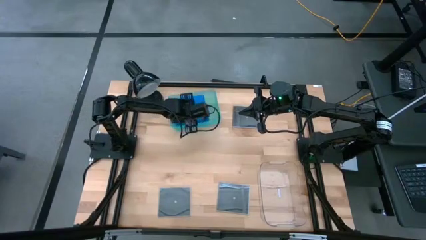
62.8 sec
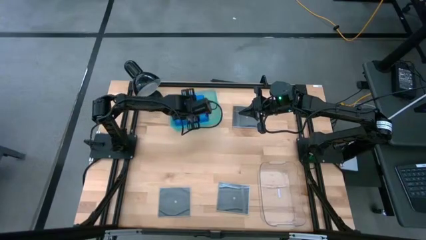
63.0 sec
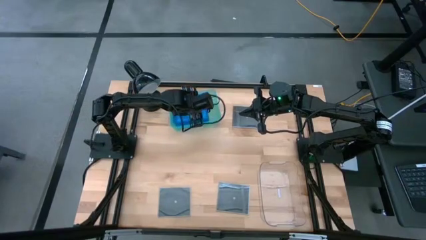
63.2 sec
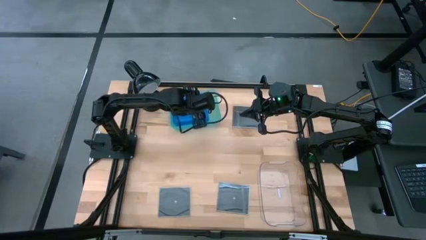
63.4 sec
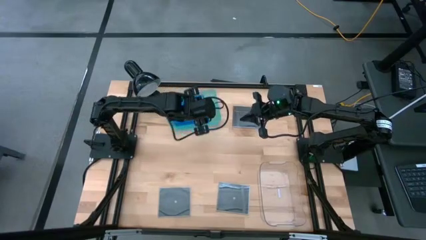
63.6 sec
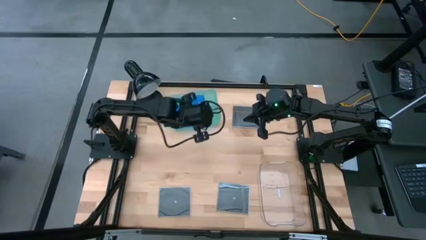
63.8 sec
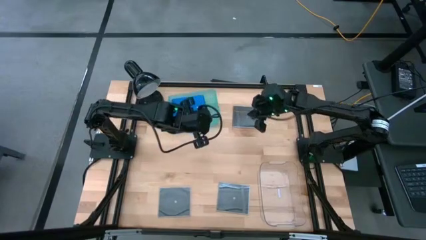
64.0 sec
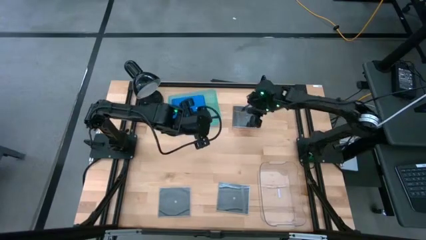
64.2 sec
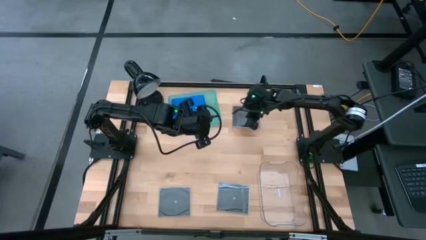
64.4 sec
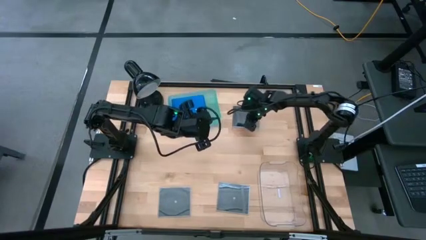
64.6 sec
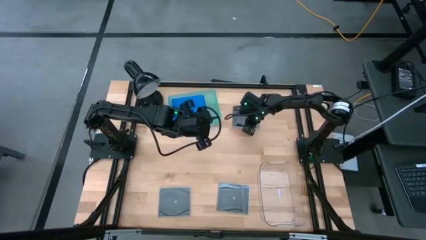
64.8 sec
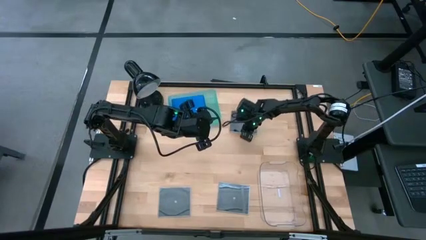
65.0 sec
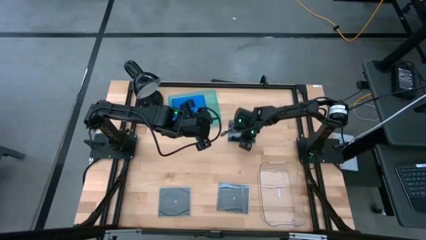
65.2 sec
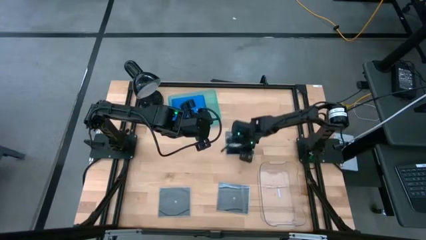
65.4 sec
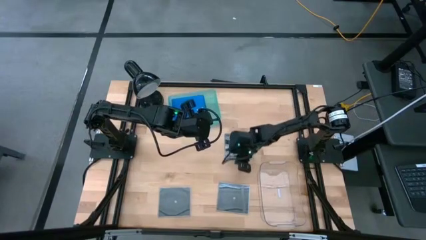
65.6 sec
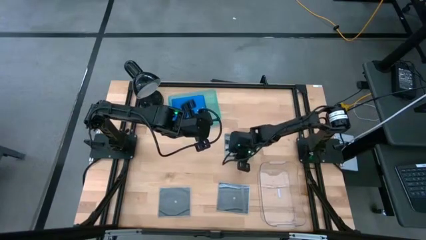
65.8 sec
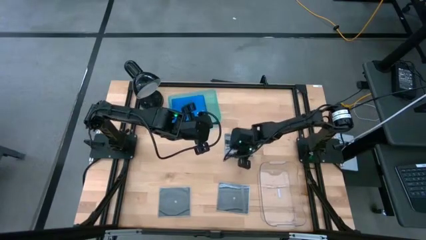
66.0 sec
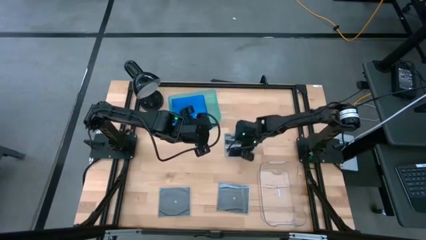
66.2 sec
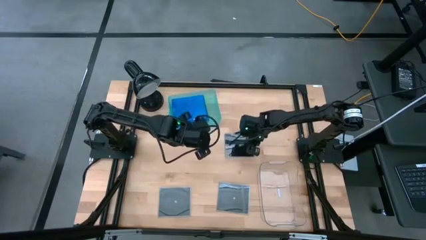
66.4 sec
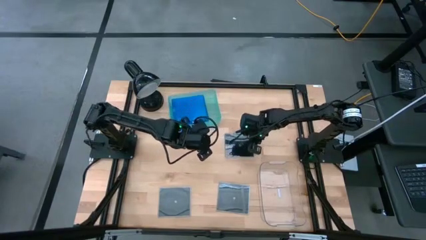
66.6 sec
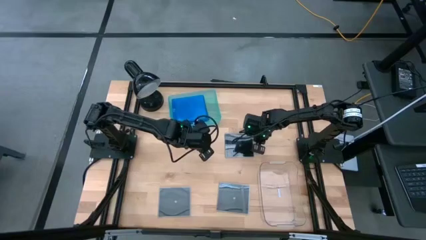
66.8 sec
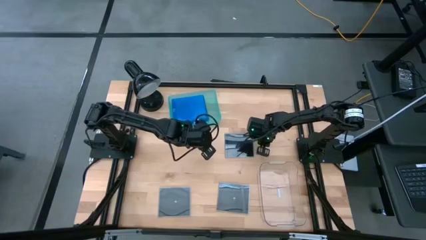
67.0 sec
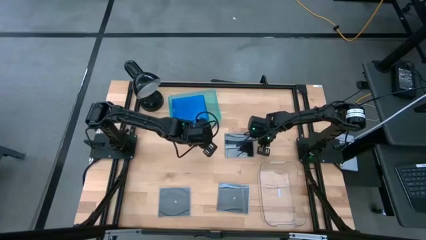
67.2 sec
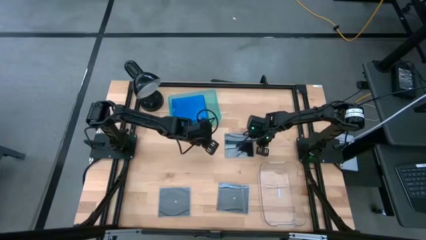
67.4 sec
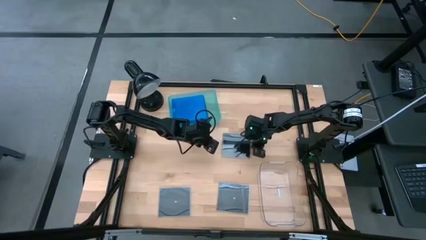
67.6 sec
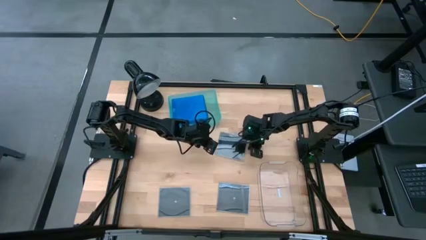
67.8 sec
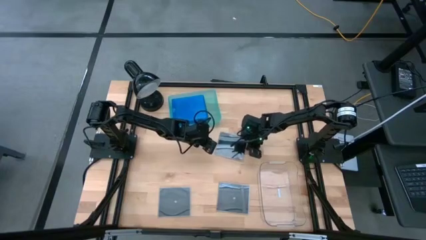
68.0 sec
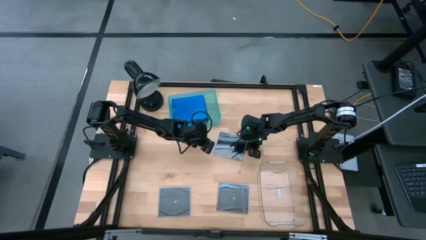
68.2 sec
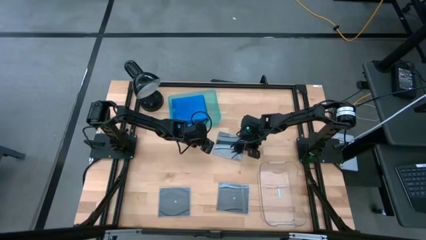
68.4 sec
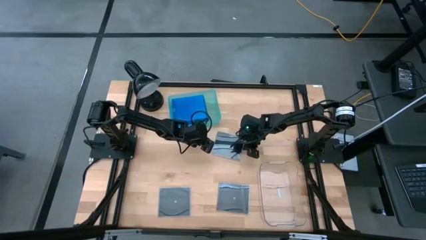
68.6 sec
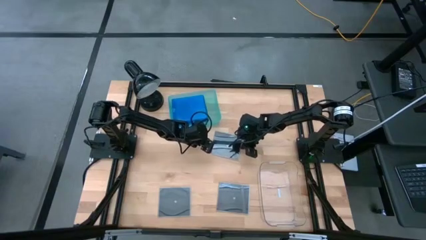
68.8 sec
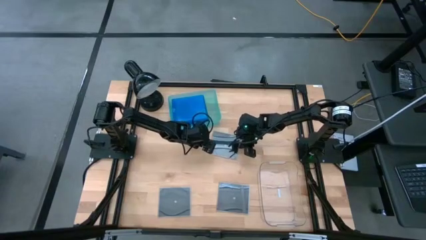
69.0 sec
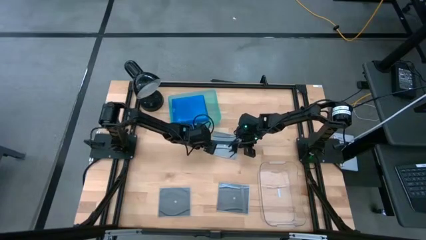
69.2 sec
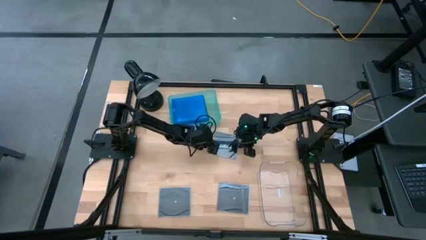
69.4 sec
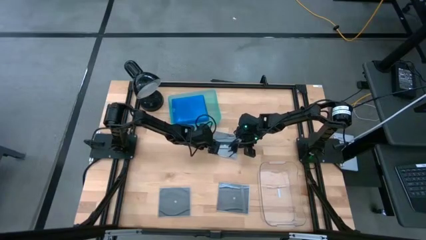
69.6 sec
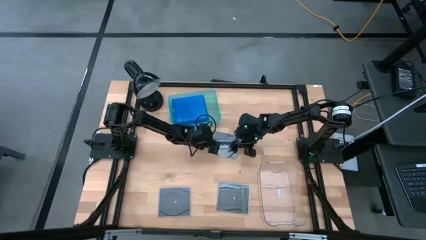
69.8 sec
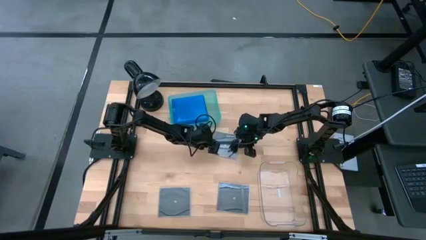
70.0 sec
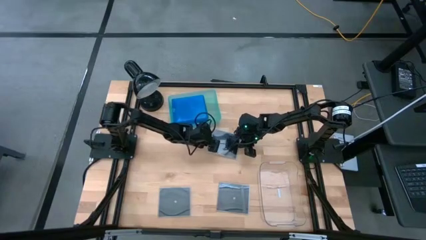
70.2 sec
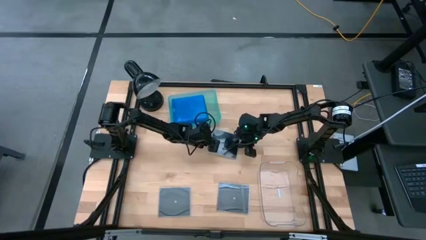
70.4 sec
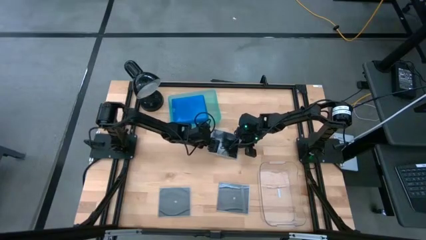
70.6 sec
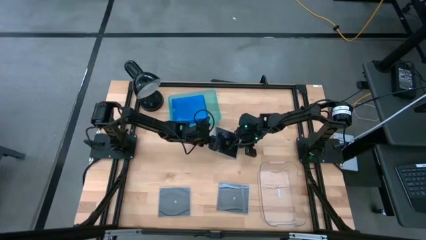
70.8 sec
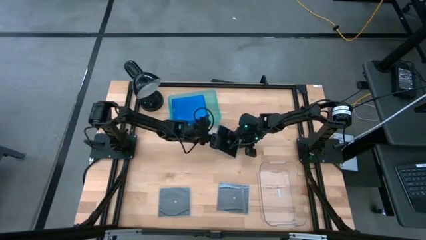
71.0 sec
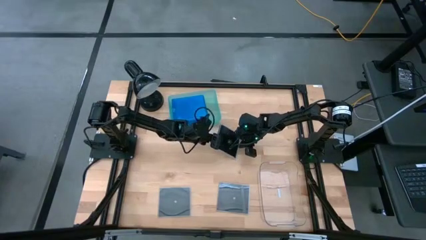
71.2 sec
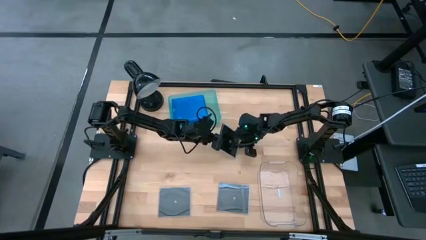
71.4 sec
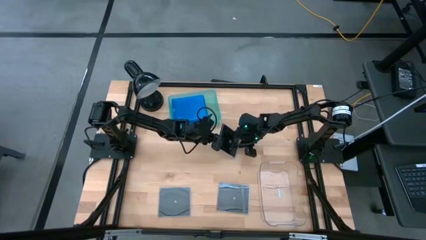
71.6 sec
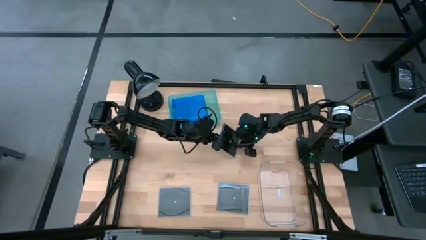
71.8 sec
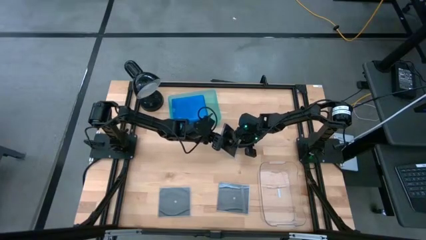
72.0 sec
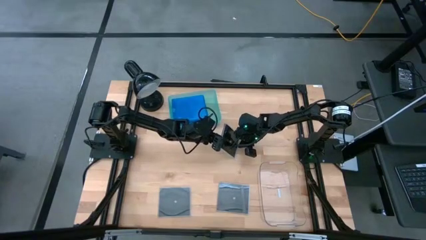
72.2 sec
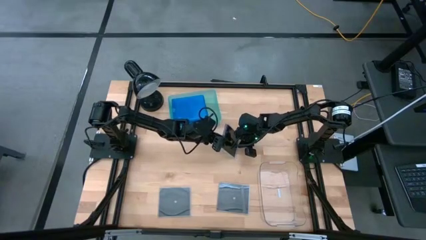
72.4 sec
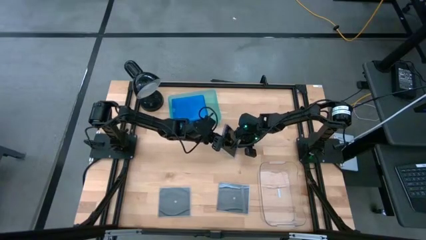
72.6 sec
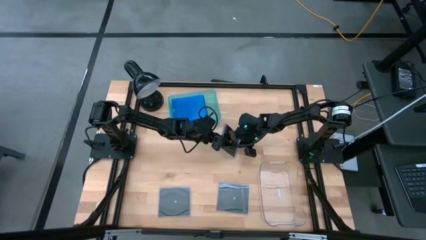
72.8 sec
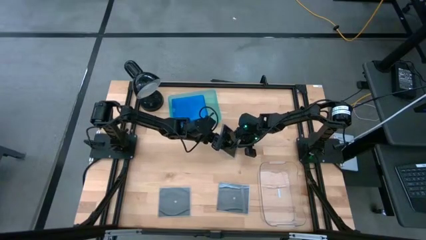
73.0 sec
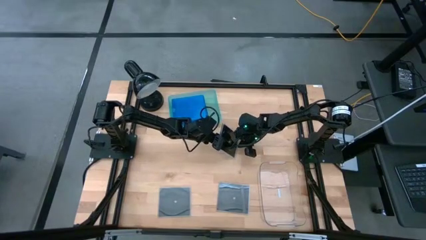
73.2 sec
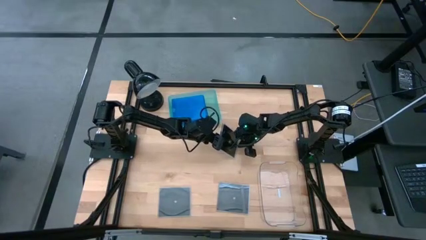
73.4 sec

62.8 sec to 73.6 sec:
Task: Pick & place jewel cases by type
Put the top black CD case into the transparent bin

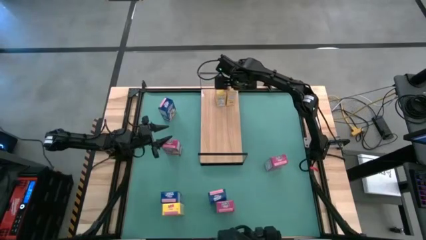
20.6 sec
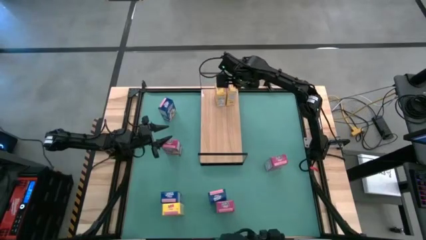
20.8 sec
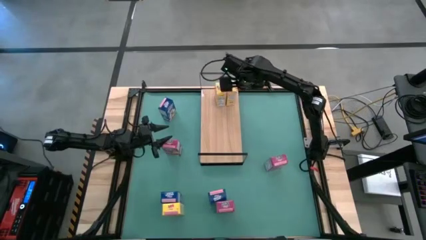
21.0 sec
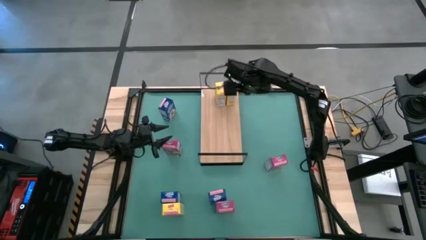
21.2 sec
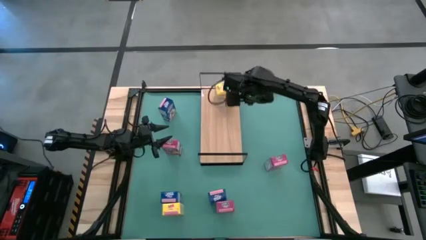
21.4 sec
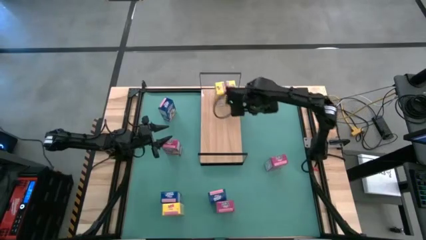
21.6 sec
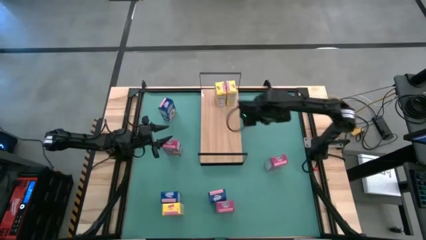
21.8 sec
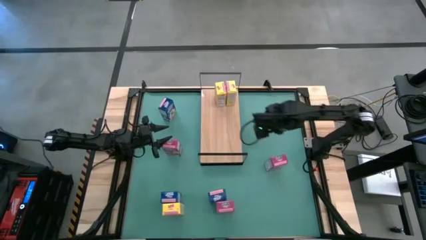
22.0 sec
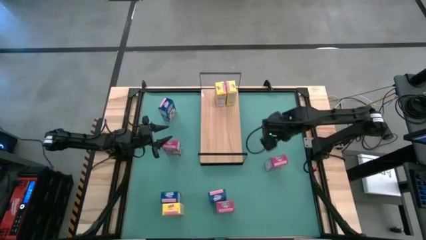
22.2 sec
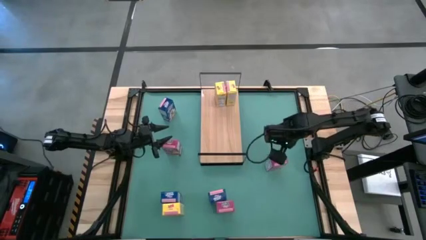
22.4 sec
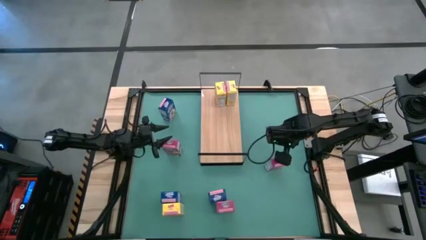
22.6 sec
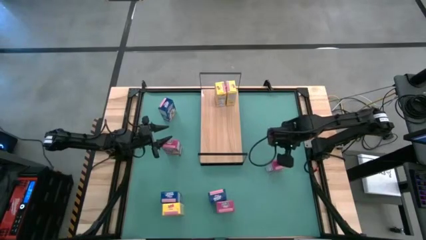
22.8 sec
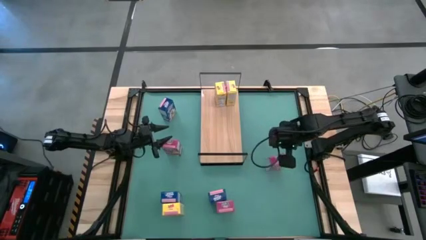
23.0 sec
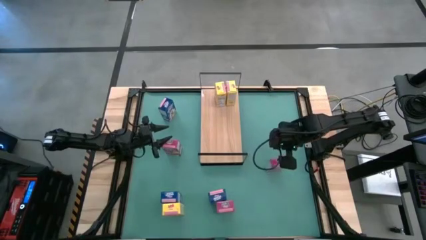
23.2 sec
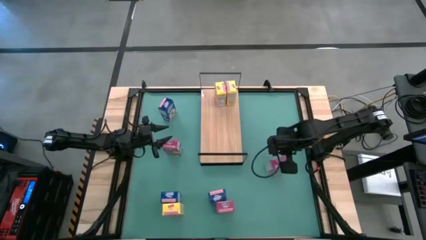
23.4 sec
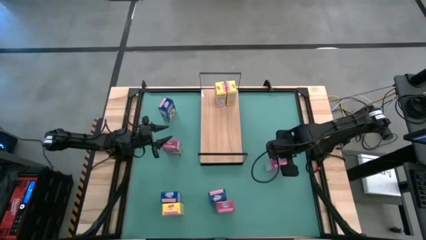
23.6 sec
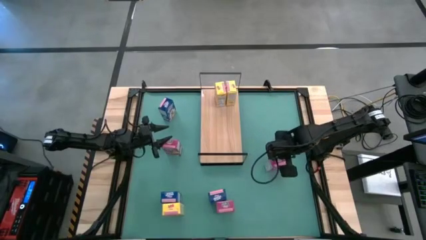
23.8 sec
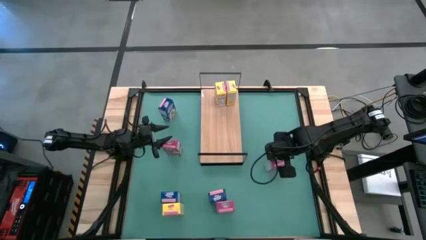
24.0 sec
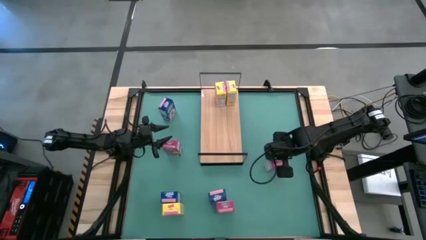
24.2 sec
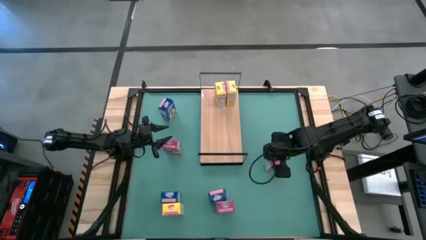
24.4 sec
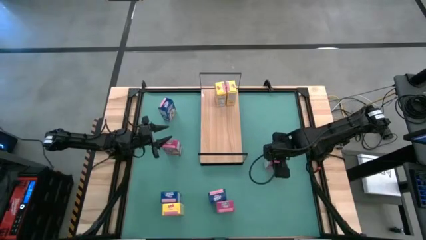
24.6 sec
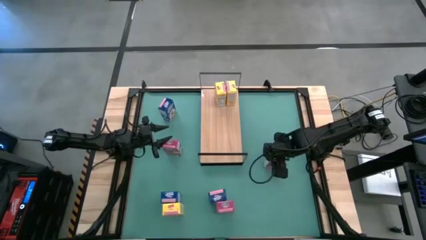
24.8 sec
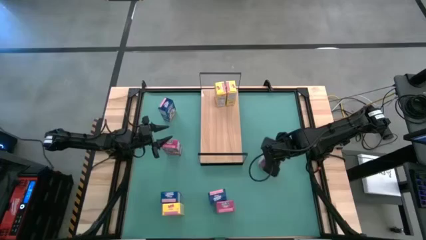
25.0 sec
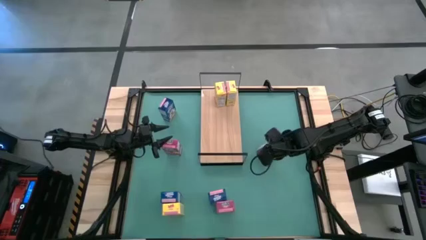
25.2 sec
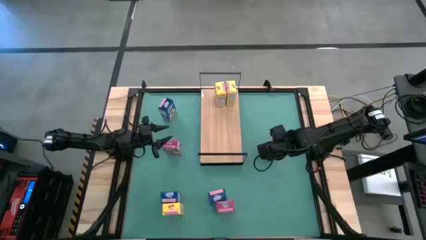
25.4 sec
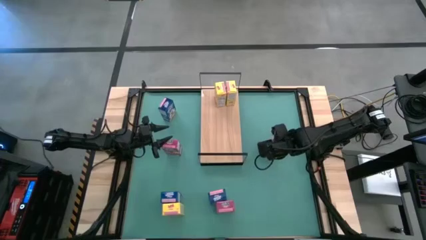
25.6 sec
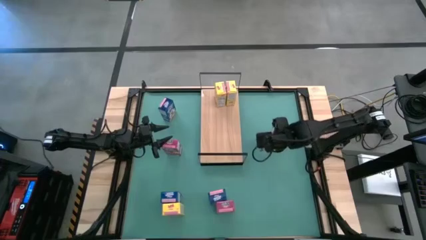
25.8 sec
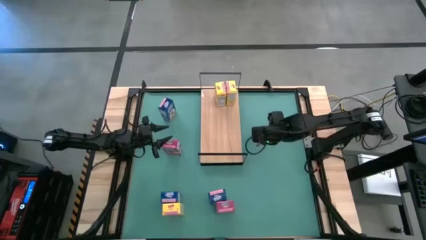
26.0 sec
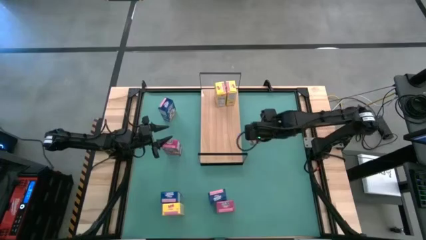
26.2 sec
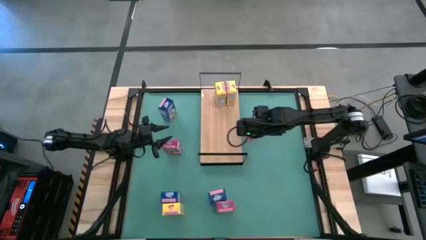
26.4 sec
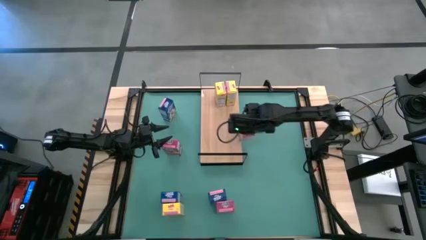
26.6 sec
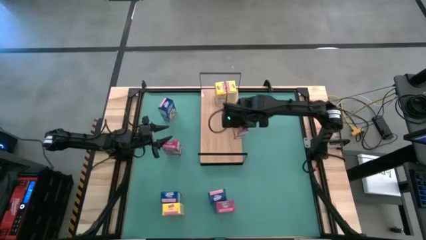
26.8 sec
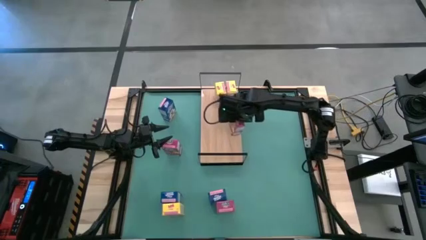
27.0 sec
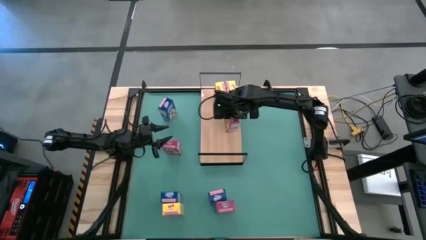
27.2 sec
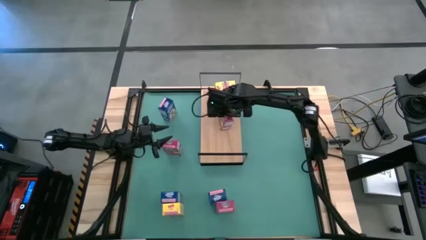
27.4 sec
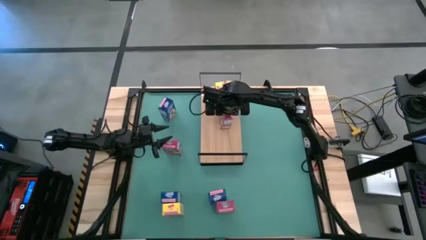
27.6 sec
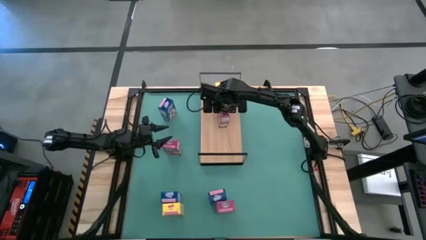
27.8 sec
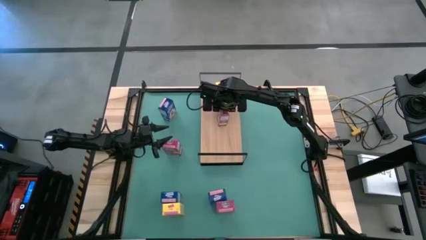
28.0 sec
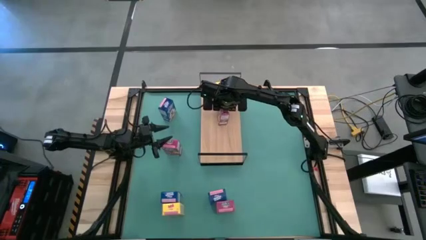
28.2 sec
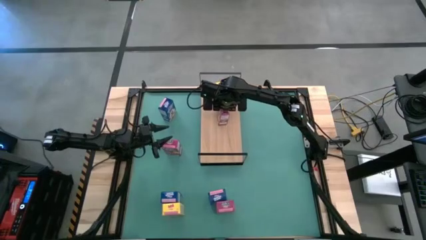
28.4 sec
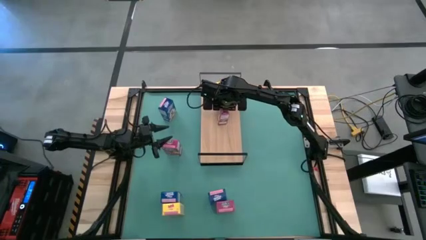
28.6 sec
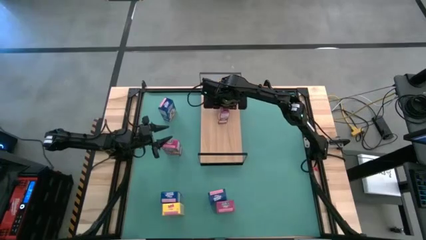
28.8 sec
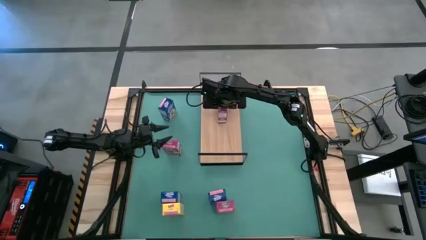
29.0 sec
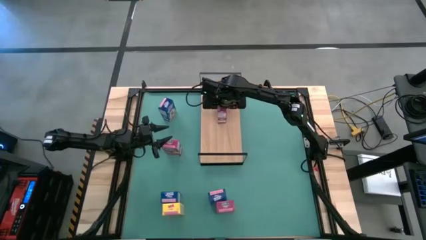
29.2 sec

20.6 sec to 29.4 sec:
Task: Stack cereal on shelf
Put the right purple cereal box on the shelf
